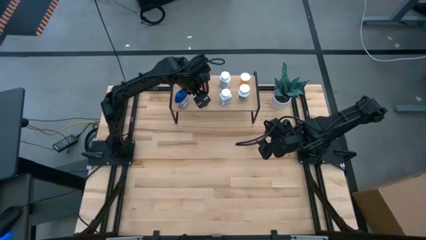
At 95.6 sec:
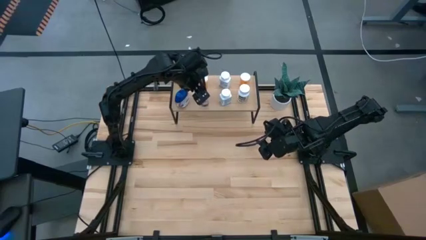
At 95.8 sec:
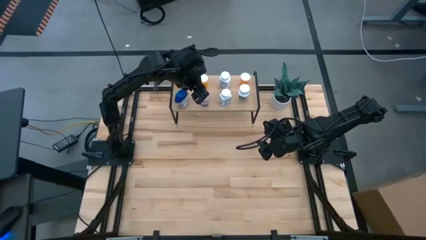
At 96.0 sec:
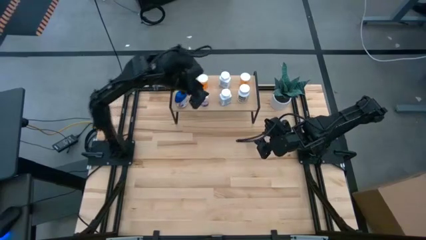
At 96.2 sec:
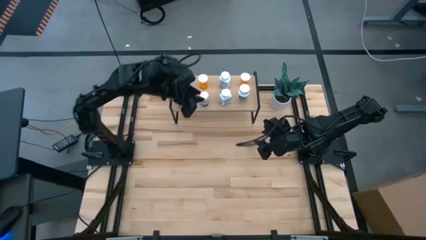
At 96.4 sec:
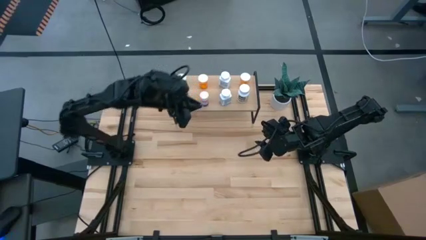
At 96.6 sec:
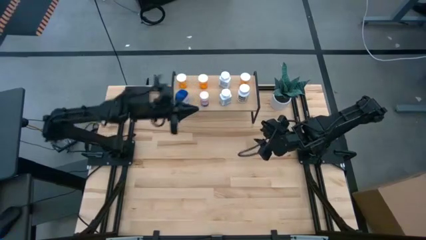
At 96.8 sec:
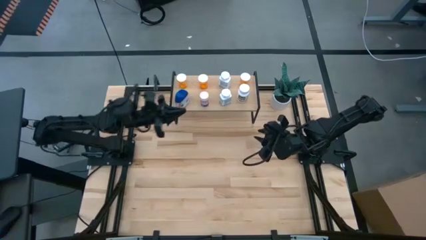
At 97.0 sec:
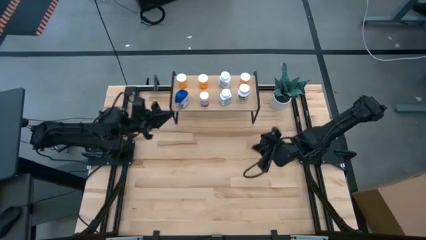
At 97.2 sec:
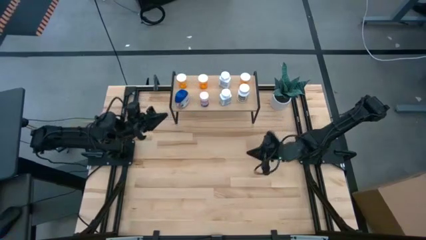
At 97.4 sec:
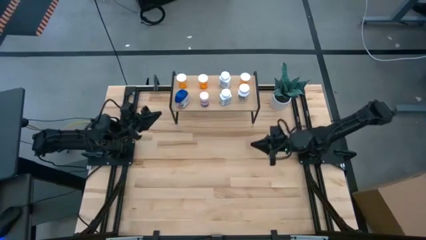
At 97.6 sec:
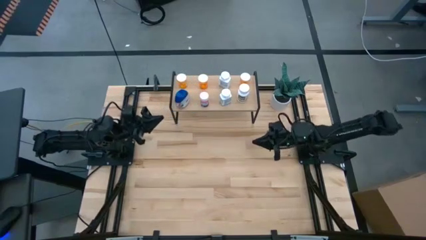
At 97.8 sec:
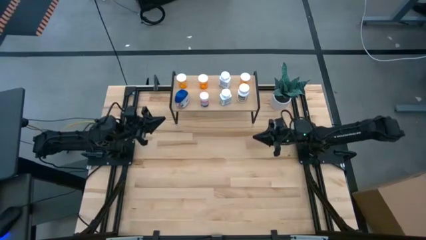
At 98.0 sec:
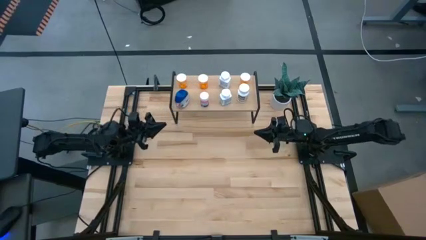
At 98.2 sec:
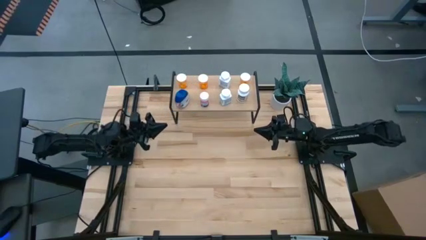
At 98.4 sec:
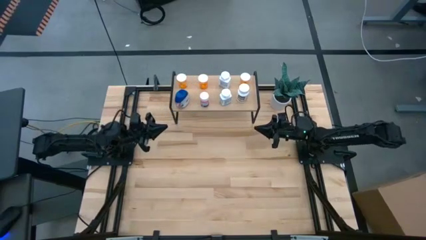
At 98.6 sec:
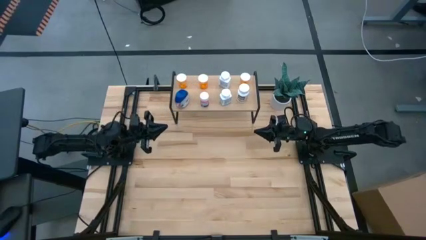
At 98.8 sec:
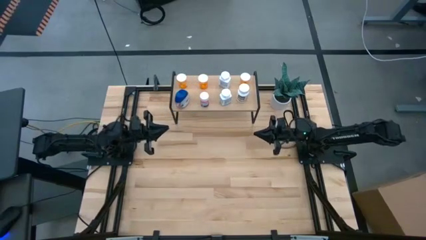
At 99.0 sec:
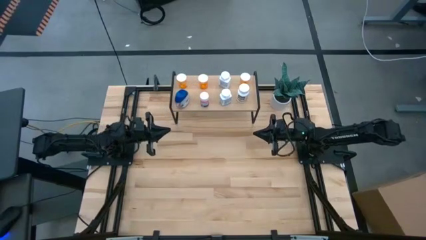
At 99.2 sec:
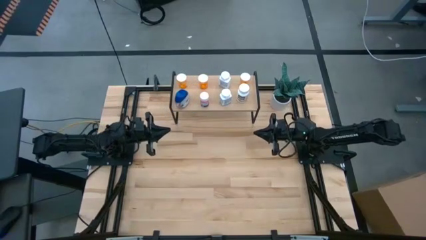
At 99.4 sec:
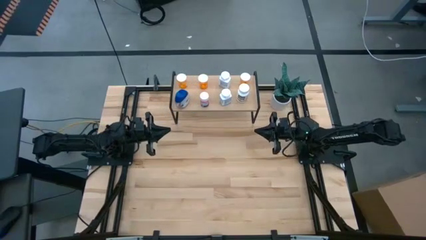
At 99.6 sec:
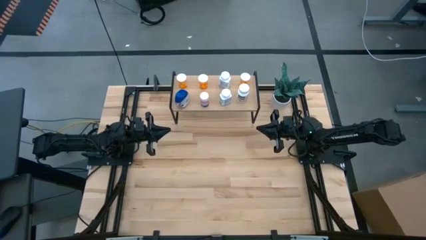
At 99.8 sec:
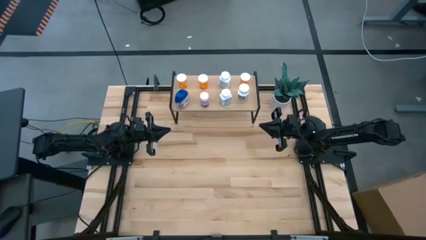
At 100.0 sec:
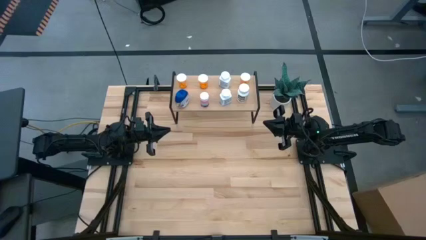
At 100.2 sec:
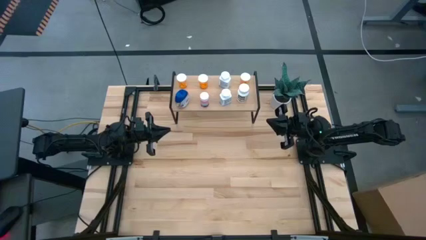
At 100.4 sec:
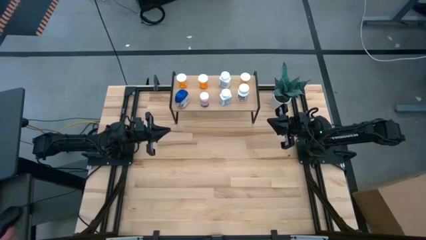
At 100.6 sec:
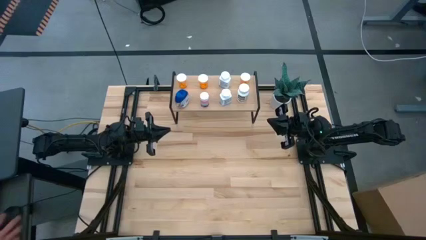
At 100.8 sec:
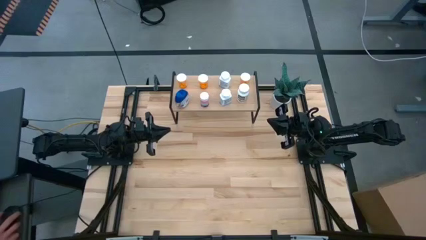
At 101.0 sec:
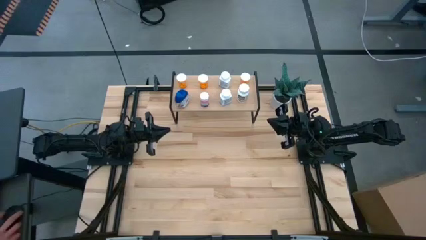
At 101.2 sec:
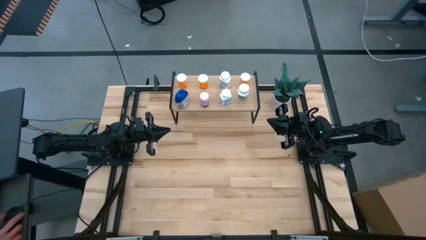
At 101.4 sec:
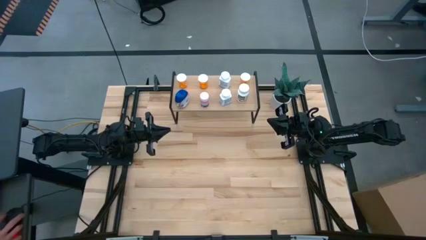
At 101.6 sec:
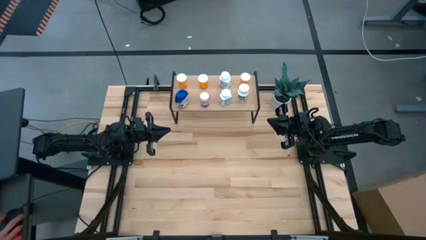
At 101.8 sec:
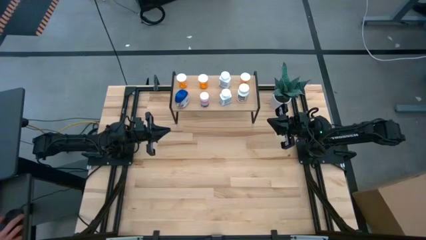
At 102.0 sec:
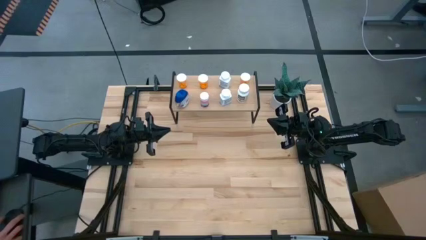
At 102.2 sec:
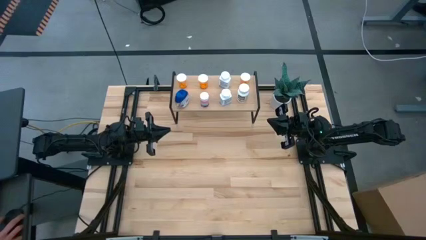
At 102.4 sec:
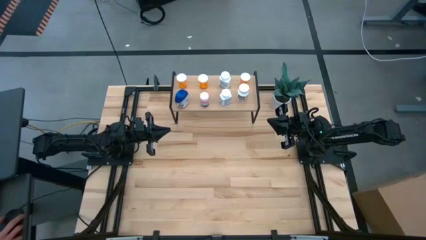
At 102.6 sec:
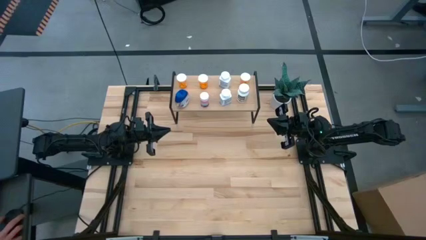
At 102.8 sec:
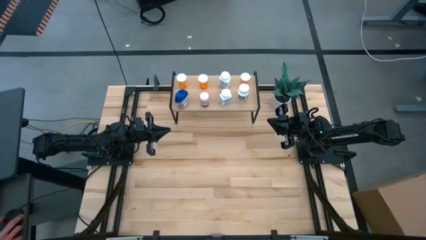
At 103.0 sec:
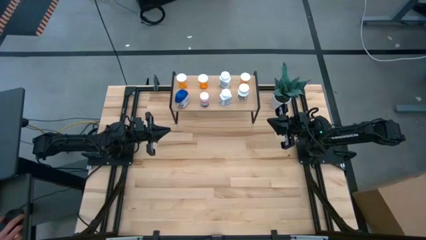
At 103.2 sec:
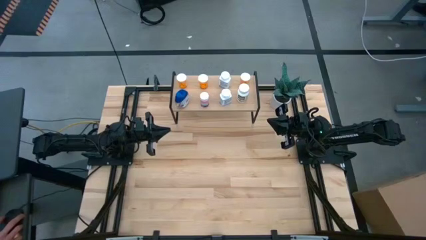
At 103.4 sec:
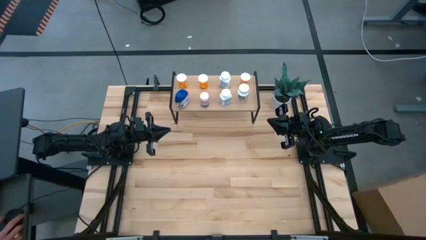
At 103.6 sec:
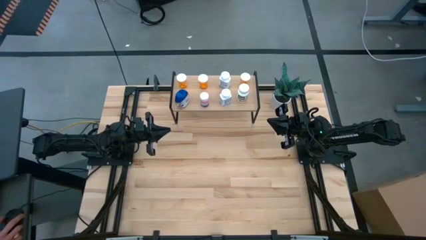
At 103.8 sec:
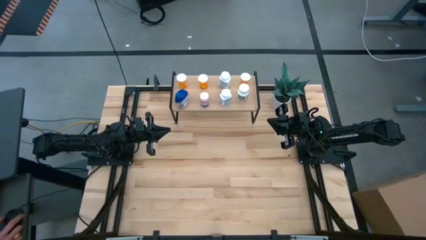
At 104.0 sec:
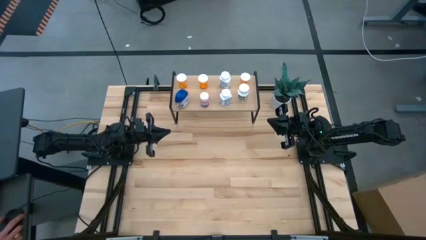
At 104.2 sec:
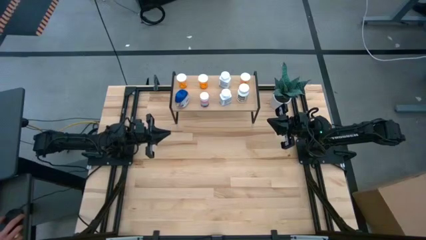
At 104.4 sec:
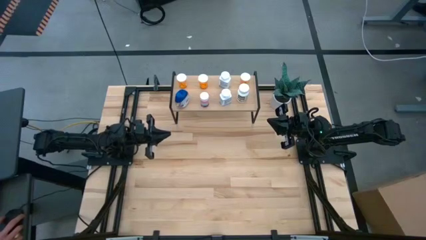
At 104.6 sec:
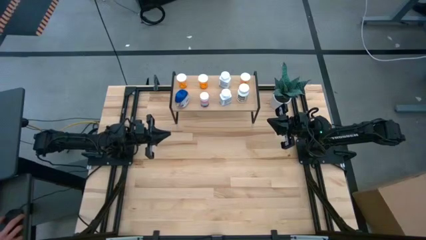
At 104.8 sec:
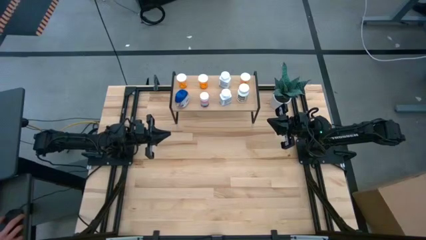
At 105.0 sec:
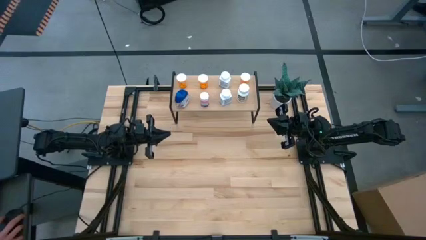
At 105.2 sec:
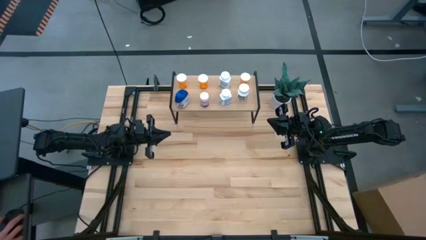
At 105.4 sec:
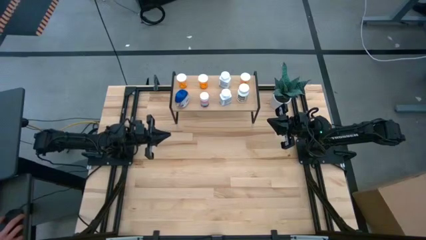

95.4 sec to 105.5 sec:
Task: Pick and place medicine bottles onto shelf by color
Return to Home Position
